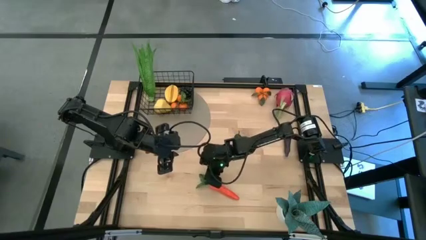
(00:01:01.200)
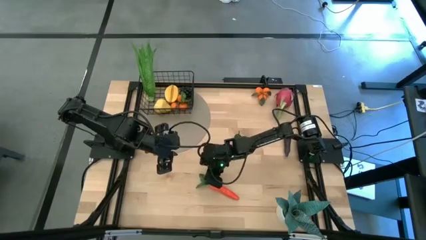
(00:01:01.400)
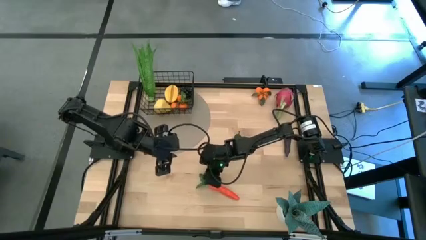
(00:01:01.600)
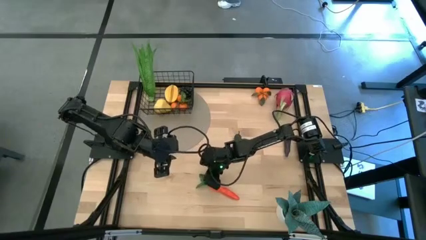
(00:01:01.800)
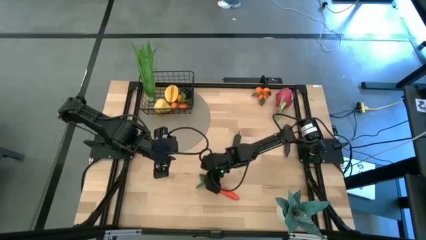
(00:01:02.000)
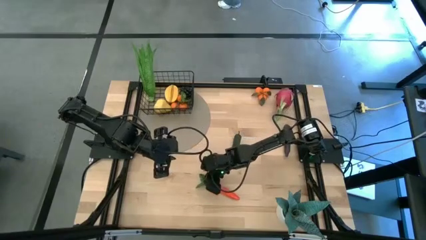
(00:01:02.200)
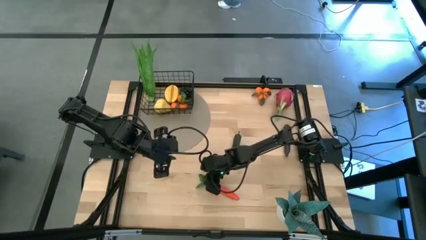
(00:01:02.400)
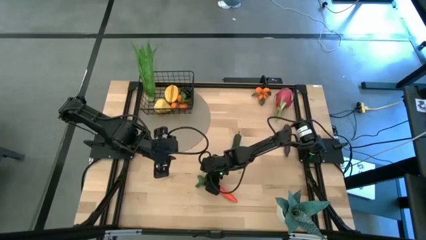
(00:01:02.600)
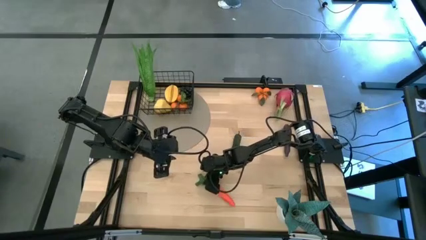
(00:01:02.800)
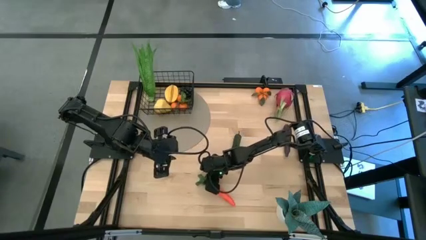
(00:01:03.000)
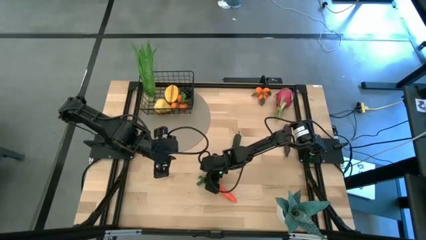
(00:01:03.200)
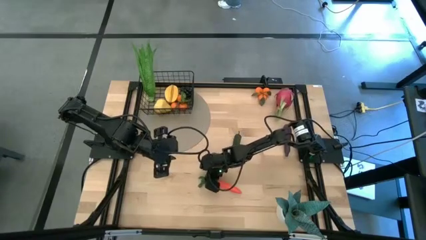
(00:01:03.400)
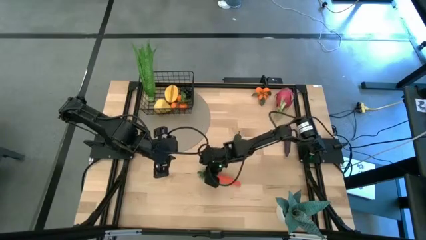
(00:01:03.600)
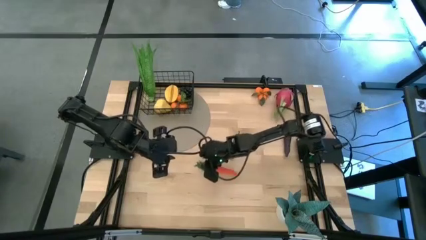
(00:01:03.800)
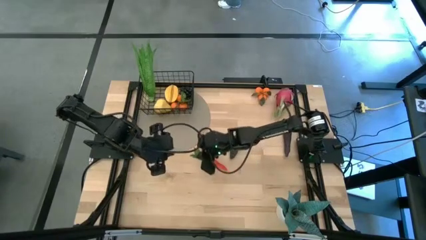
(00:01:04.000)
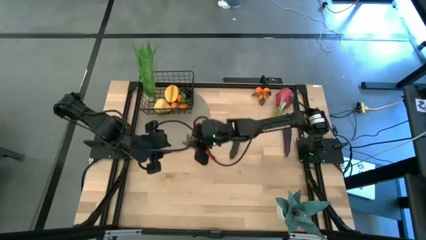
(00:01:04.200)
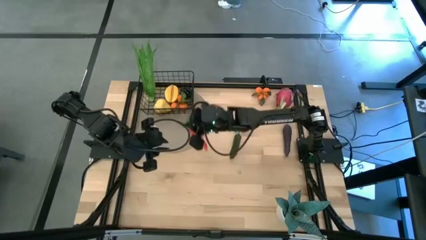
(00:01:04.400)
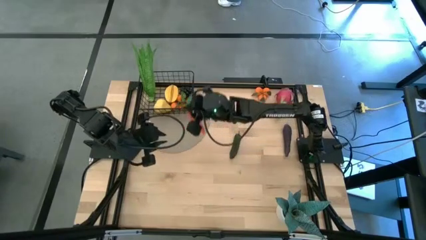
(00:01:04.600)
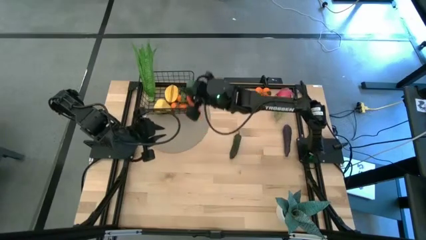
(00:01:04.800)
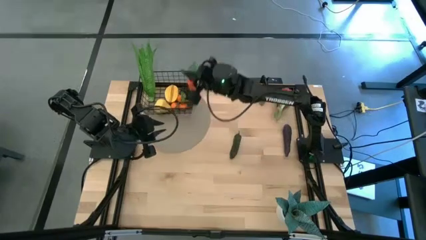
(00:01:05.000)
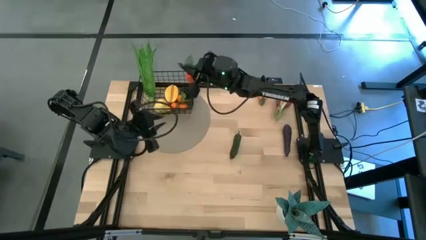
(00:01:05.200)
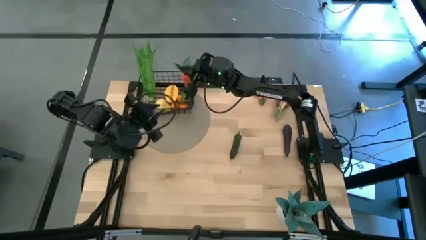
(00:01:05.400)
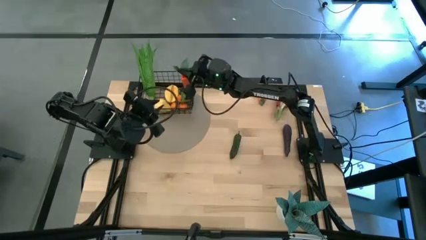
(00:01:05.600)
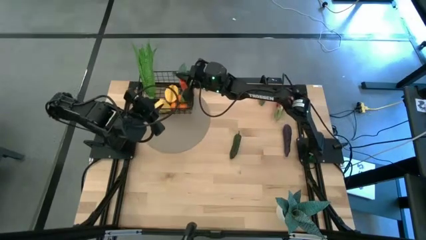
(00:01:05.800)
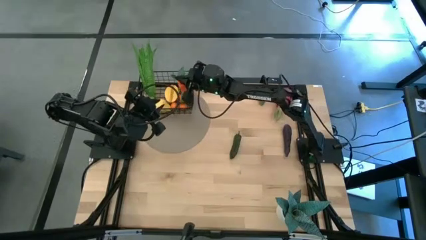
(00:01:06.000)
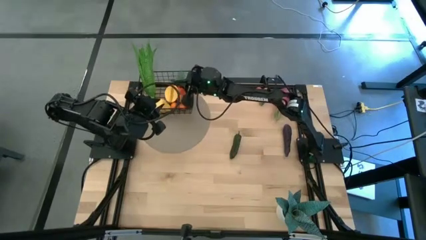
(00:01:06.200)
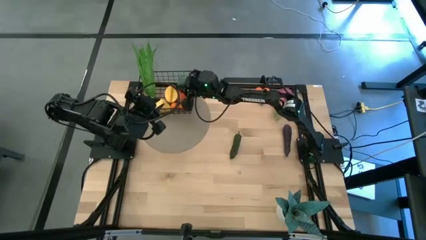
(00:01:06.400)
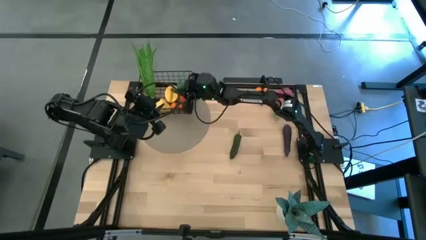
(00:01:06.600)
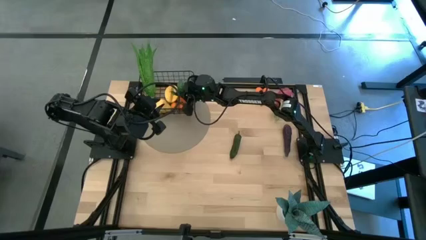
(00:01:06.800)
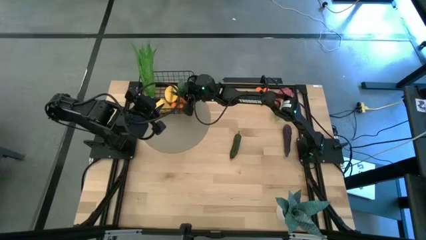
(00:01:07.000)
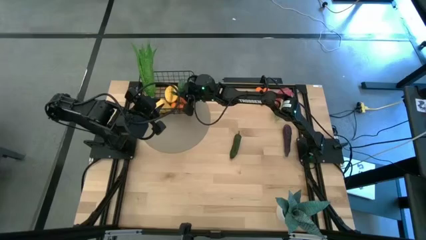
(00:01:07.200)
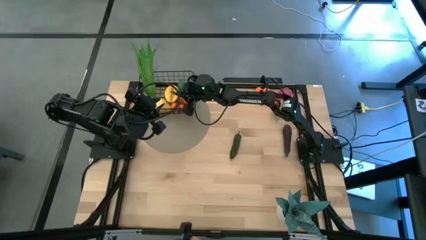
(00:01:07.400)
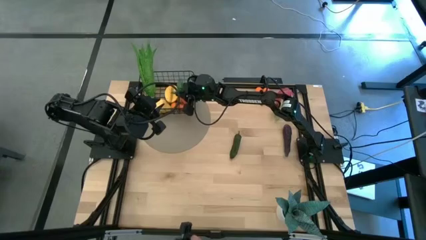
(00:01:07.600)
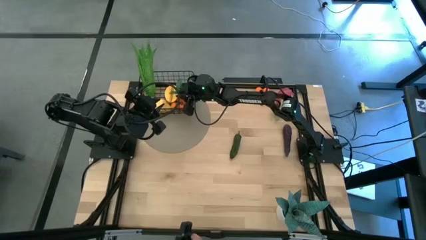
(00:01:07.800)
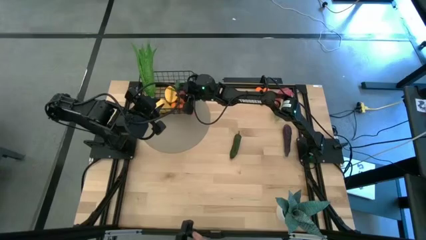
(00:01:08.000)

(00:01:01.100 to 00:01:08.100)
Task: Build produce basket
Put the orange carrot into the wire basket

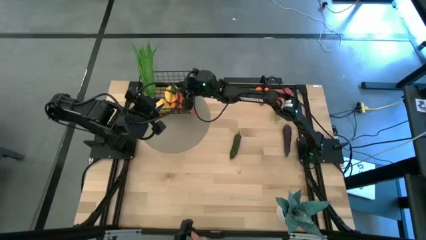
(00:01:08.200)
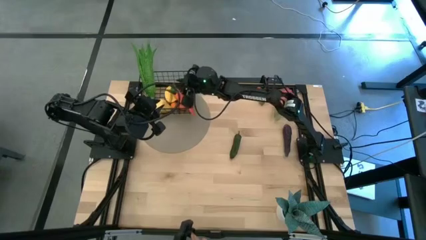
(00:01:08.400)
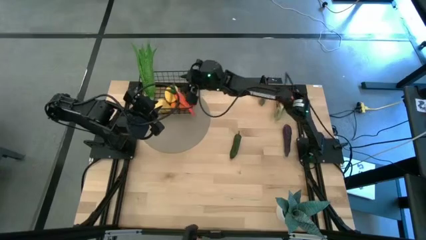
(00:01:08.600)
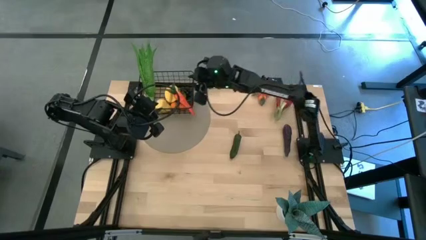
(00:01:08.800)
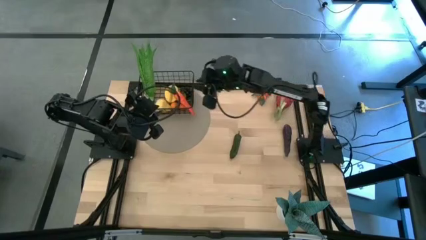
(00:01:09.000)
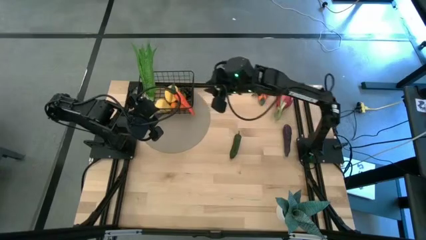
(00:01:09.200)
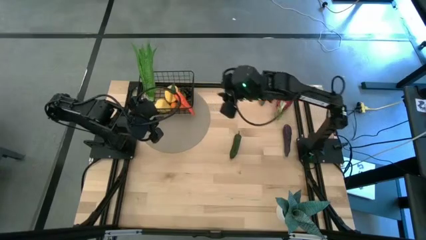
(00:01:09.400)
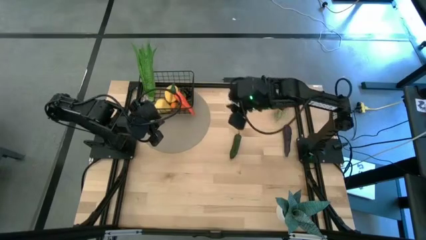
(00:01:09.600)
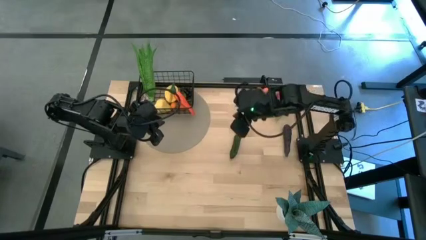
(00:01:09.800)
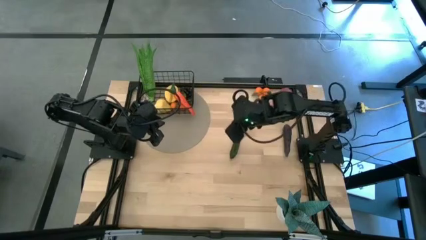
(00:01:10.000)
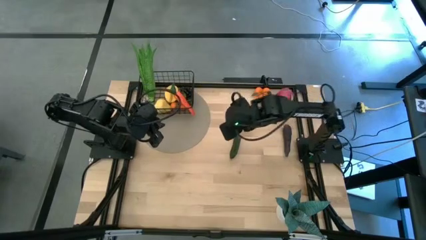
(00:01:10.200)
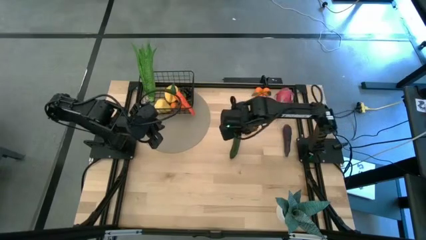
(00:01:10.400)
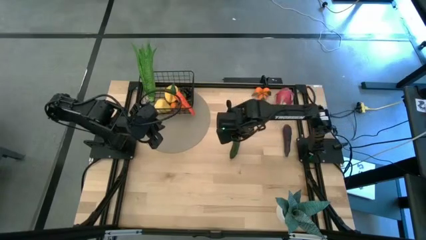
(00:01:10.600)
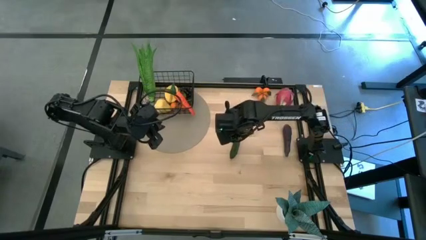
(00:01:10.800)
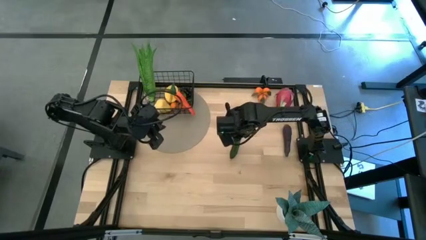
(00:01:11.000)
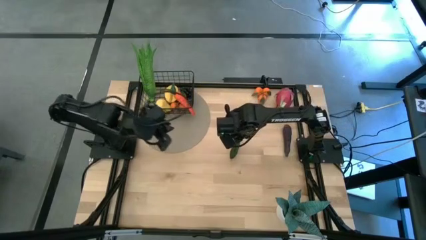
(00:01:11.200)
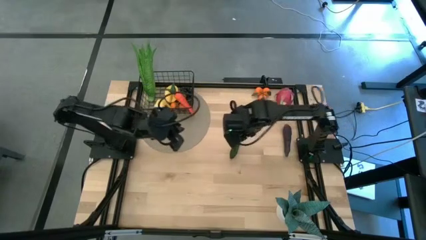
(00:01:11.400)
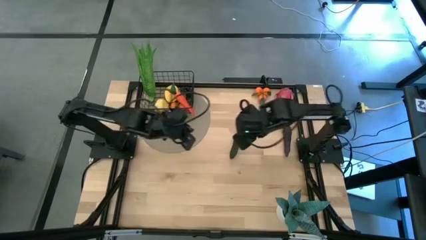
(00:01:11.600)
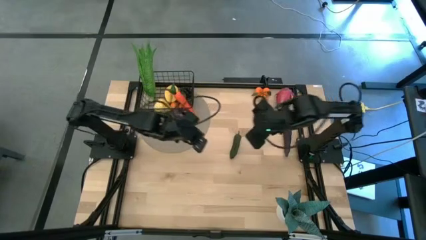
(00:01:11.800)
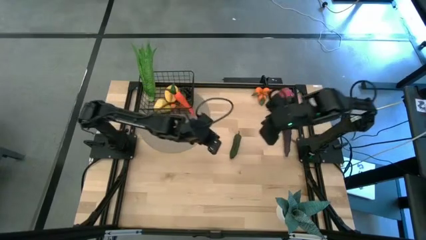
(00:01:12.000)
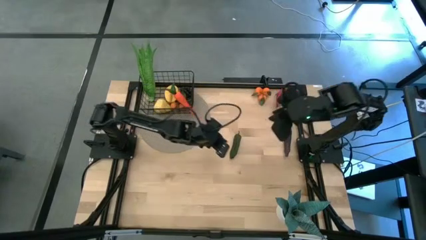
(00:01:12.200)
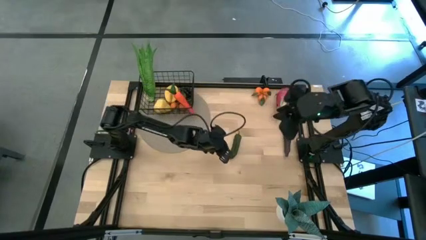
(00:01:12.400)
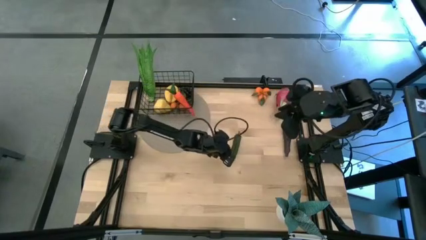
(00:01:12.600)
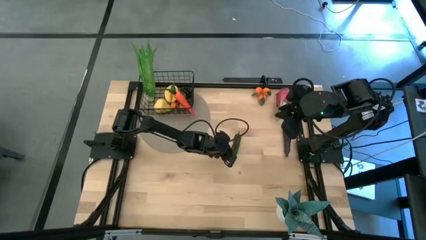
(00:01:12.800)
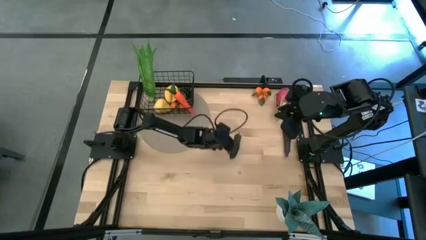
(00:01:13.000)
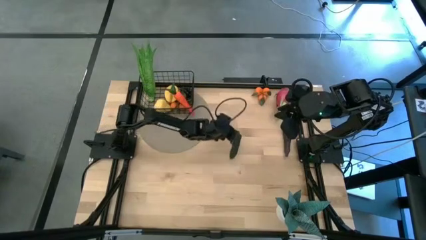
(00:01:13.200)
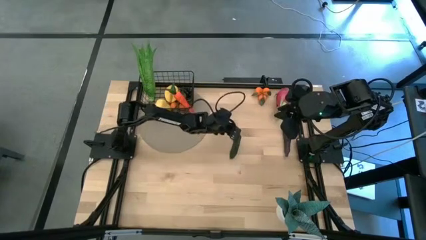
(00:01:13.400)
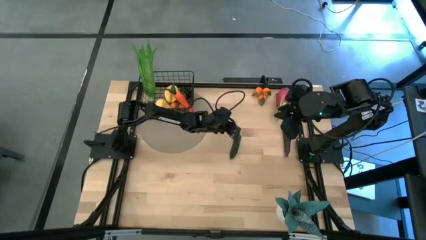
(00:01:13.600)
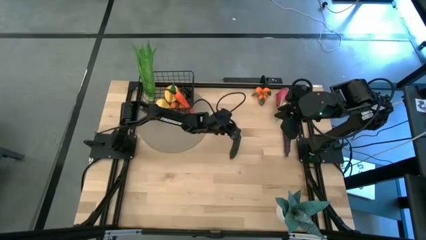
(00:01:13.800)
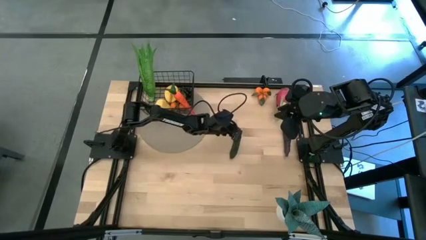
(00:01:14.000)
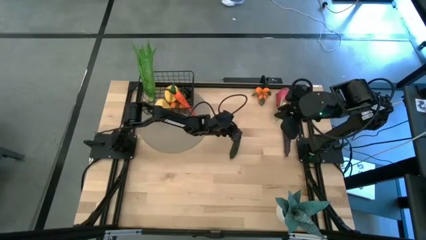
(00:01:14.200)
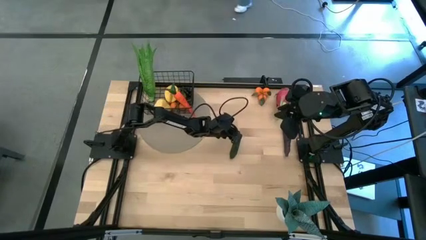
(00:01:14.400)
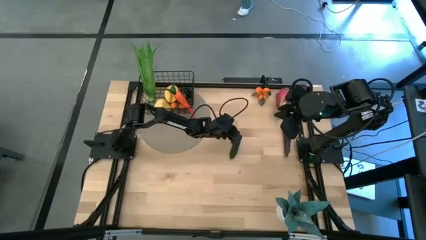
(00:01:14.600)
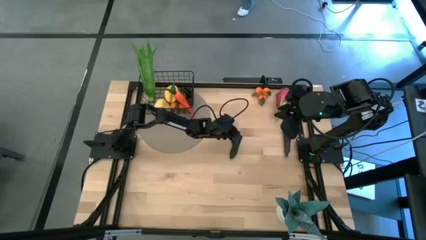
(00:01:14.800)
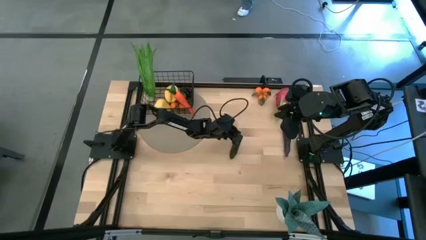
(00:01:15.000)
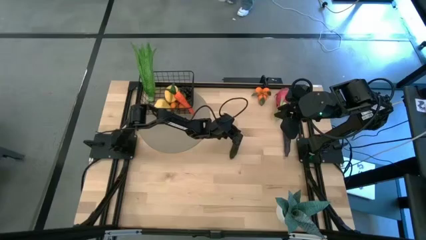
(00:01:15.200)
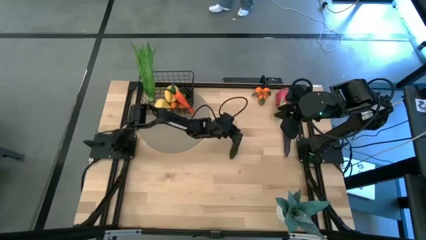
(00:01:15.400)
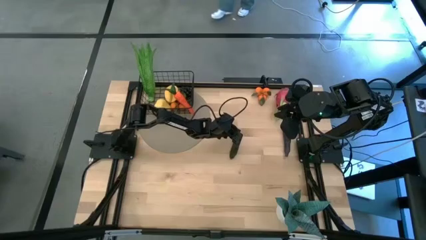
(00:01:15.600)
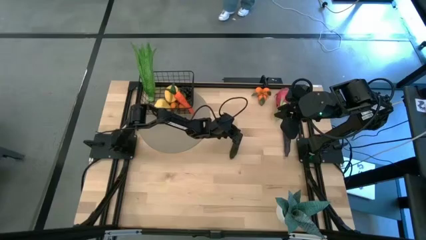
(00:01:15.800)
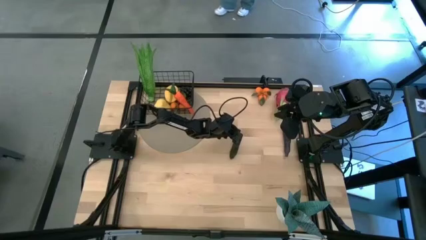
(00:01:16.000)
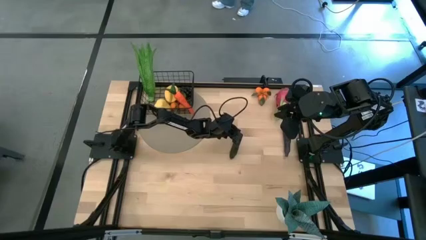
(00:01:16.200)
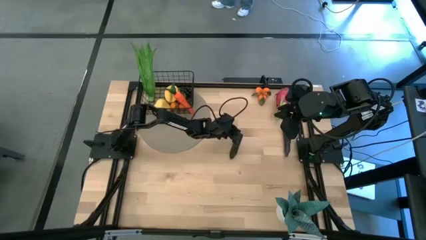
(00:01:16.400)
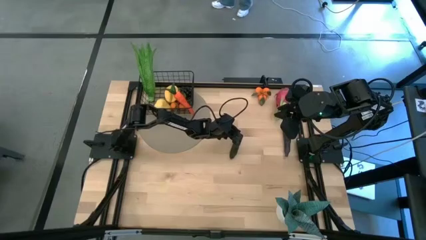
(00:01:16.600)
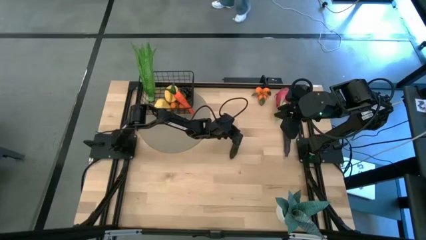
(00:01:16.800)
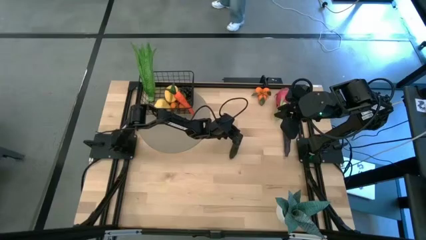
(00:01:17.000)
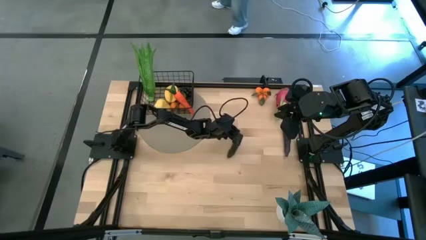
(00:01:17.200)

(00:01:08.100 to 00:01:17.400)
Put the green chili pepper into the wire basket
